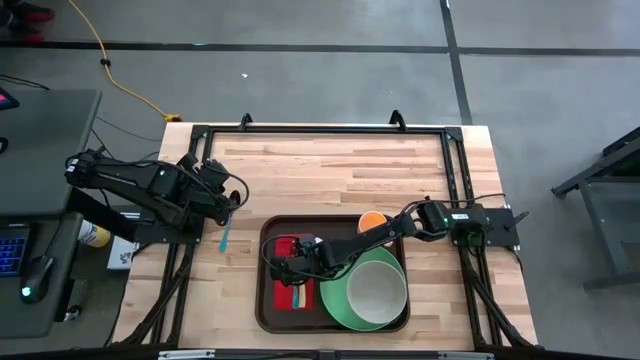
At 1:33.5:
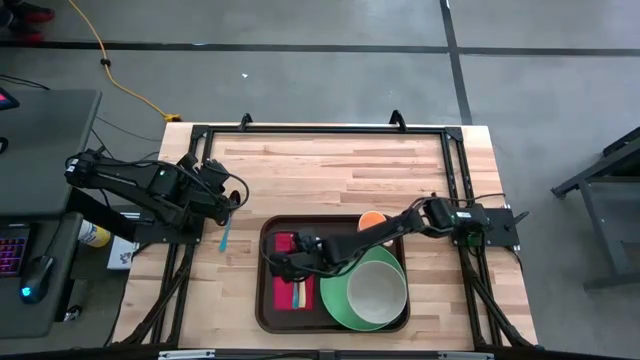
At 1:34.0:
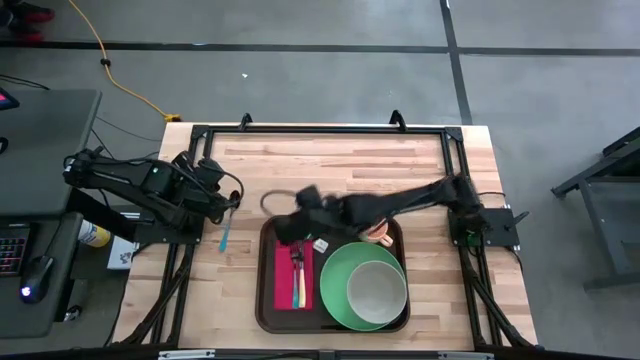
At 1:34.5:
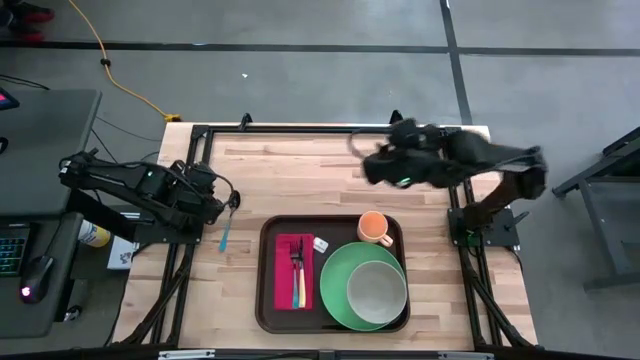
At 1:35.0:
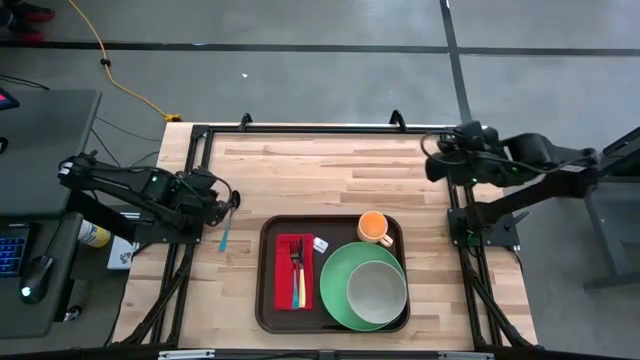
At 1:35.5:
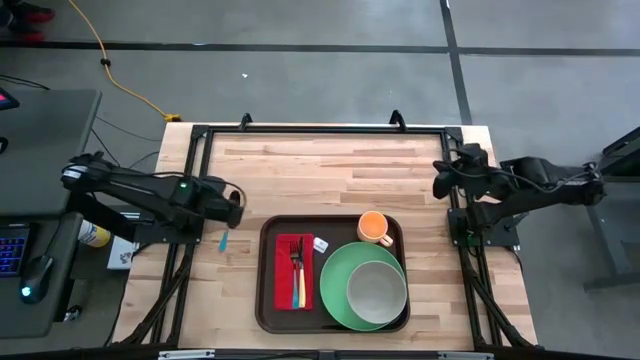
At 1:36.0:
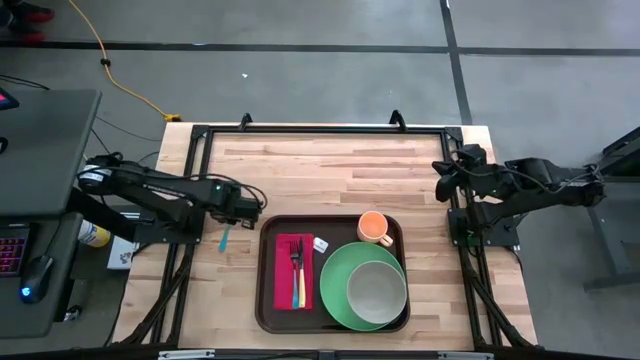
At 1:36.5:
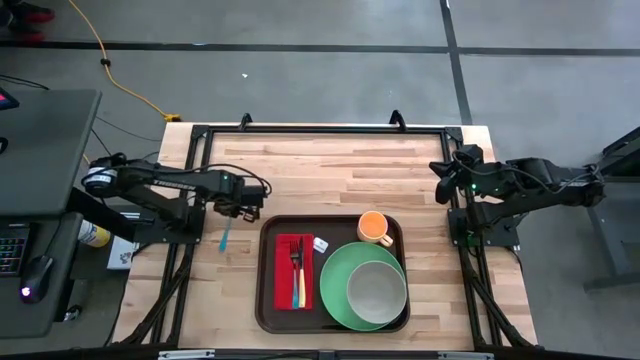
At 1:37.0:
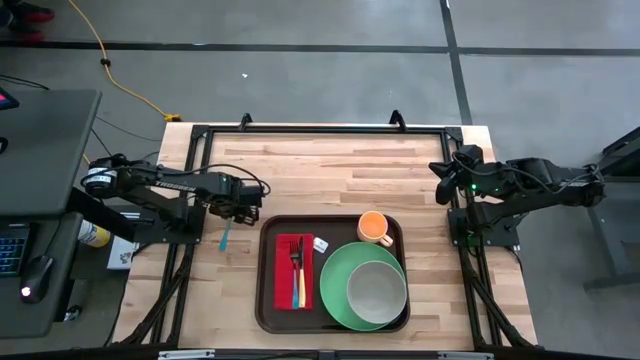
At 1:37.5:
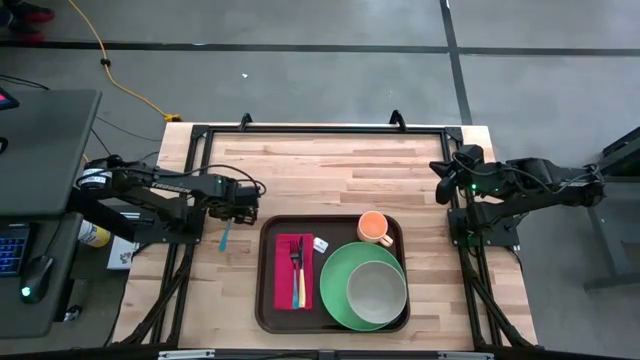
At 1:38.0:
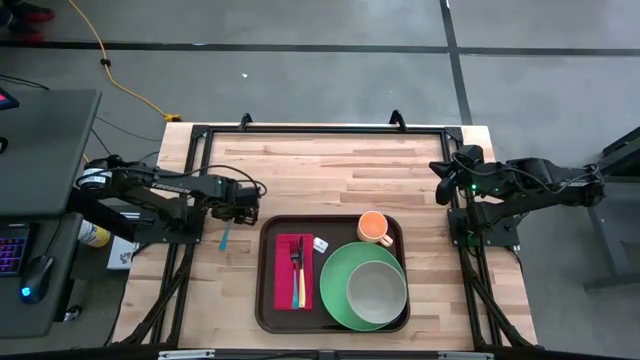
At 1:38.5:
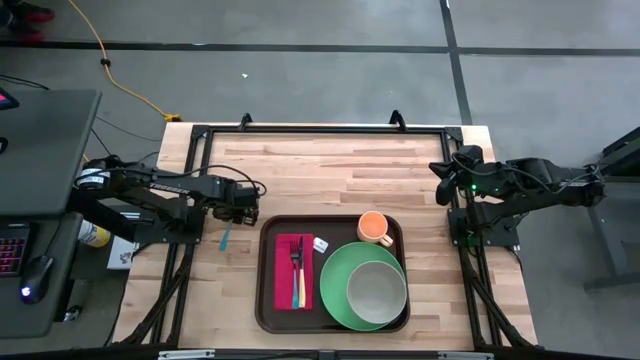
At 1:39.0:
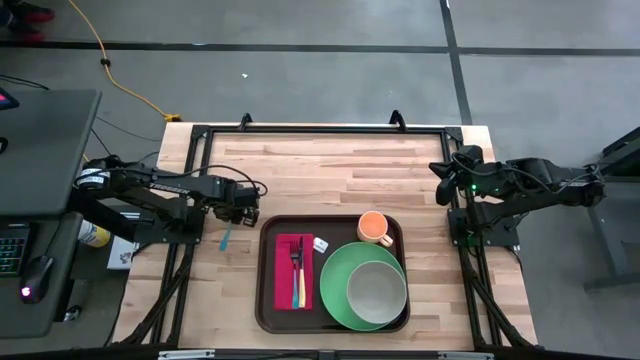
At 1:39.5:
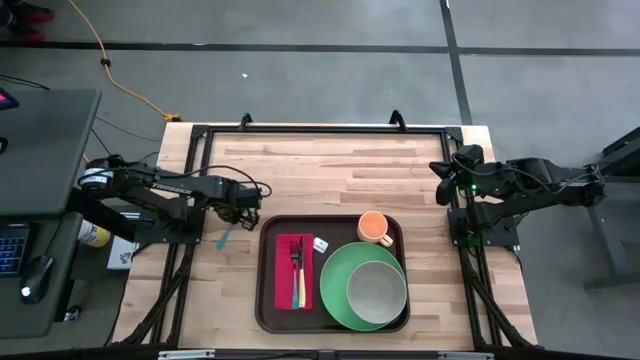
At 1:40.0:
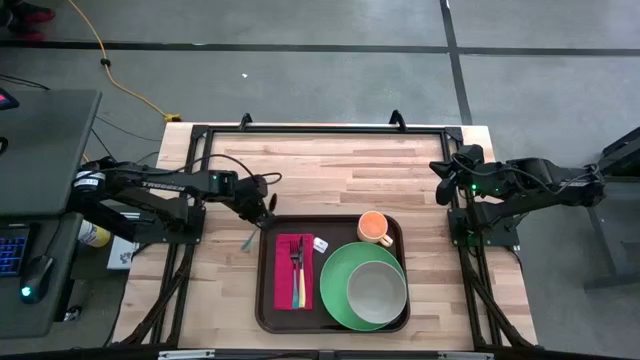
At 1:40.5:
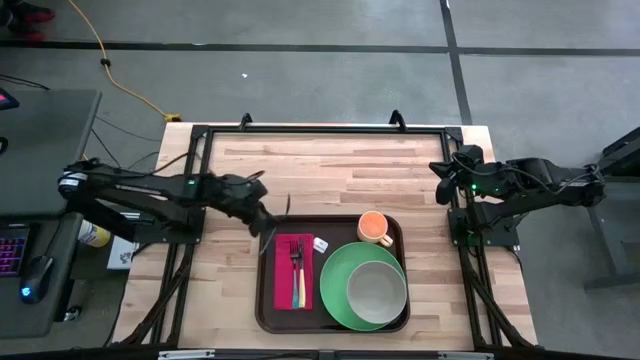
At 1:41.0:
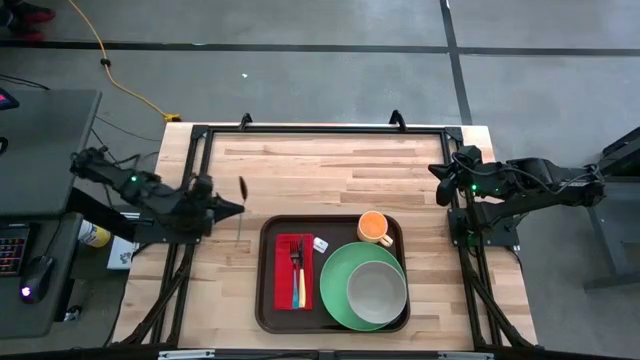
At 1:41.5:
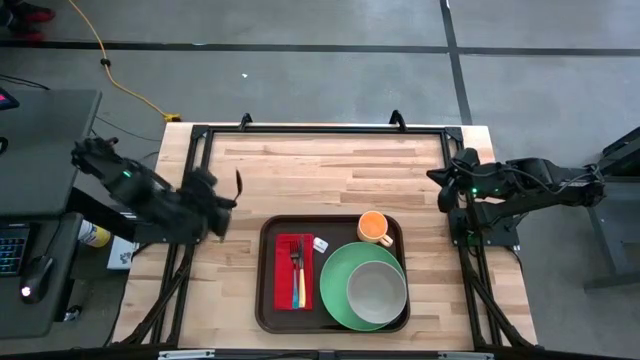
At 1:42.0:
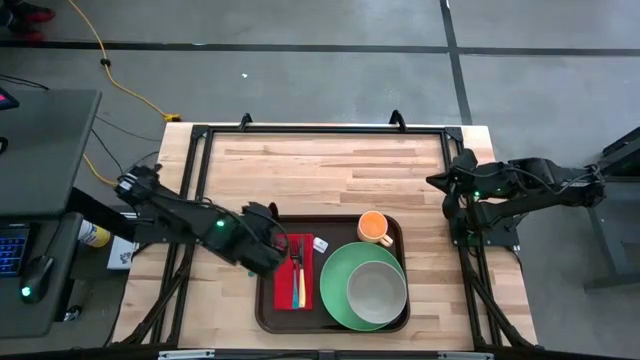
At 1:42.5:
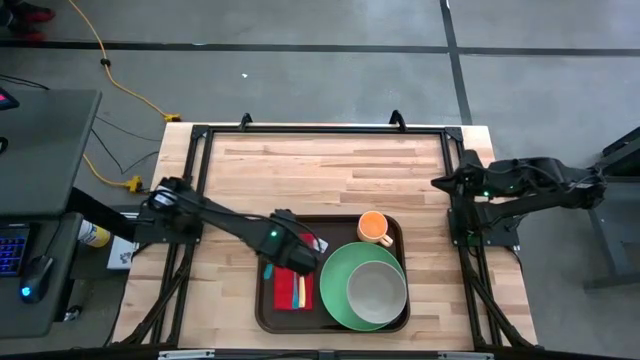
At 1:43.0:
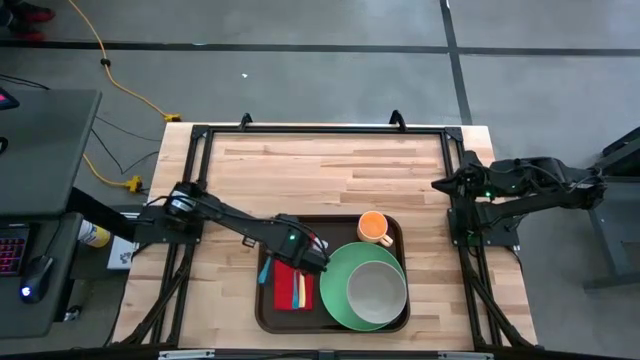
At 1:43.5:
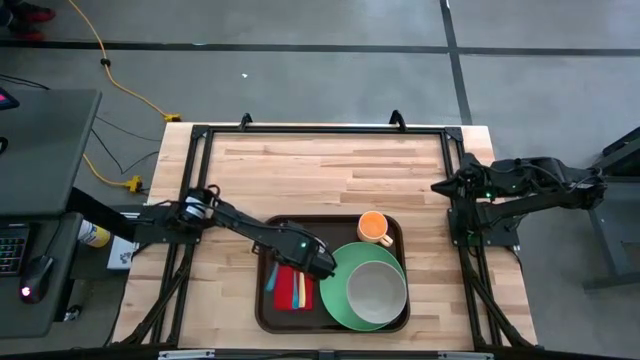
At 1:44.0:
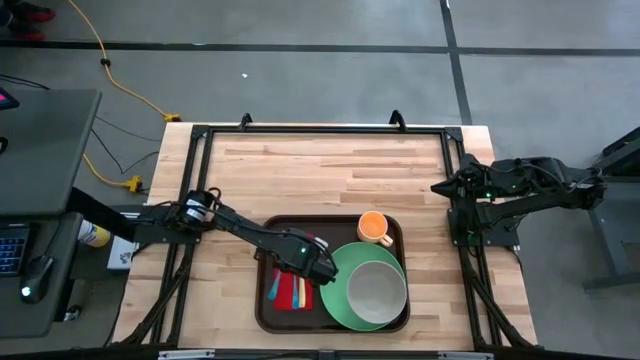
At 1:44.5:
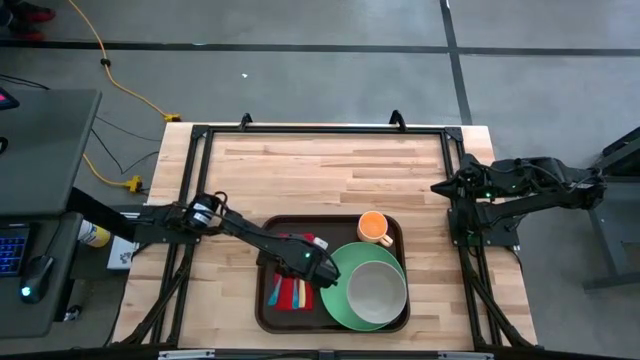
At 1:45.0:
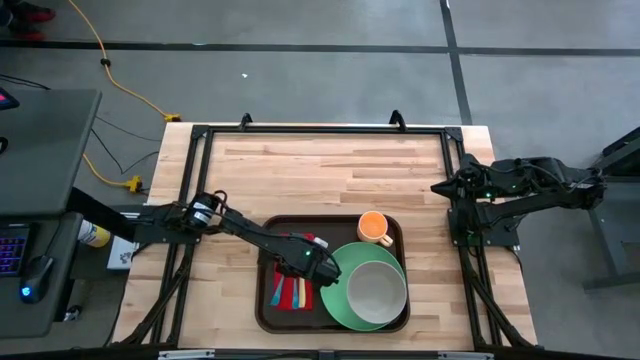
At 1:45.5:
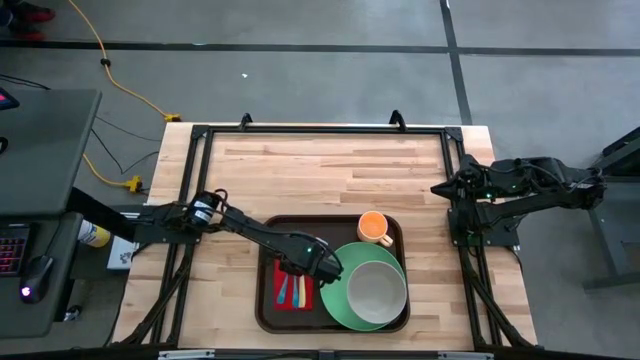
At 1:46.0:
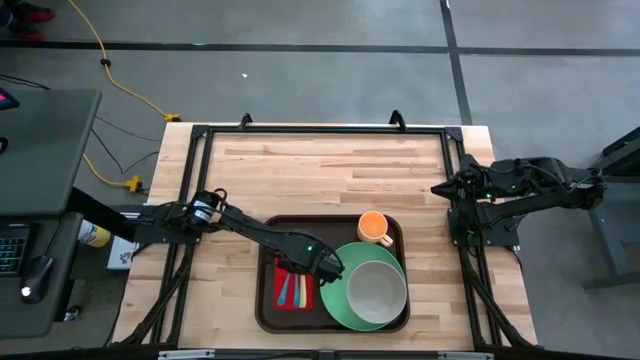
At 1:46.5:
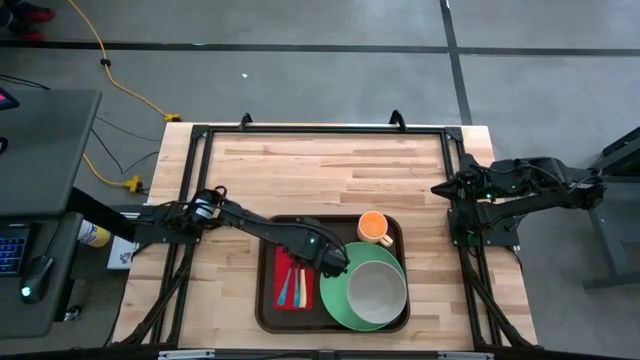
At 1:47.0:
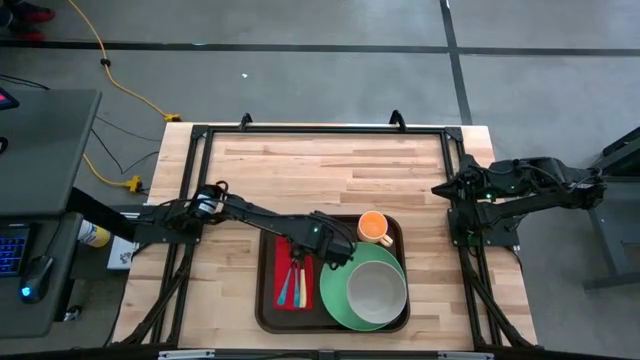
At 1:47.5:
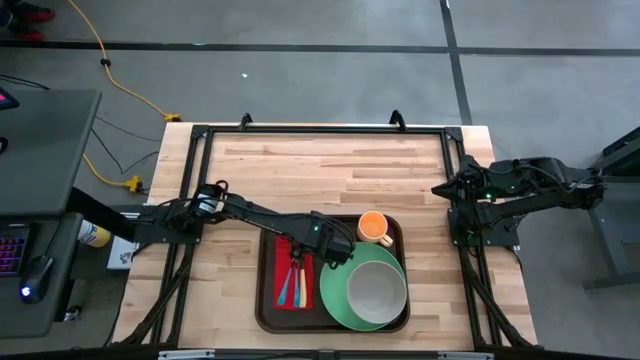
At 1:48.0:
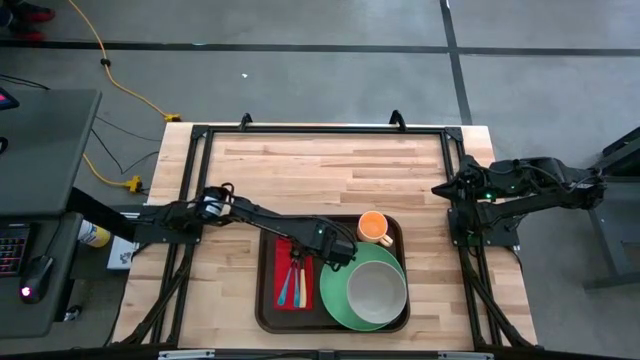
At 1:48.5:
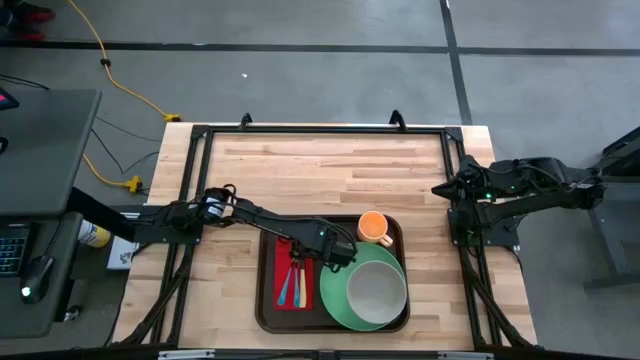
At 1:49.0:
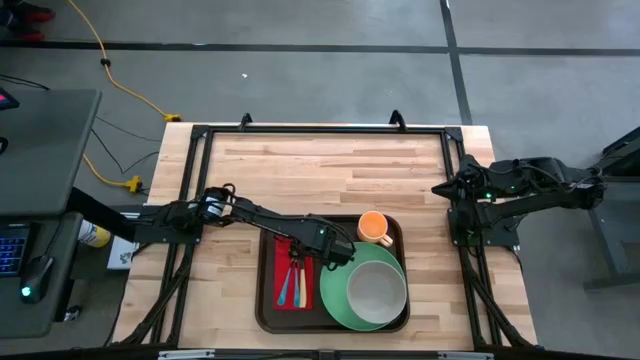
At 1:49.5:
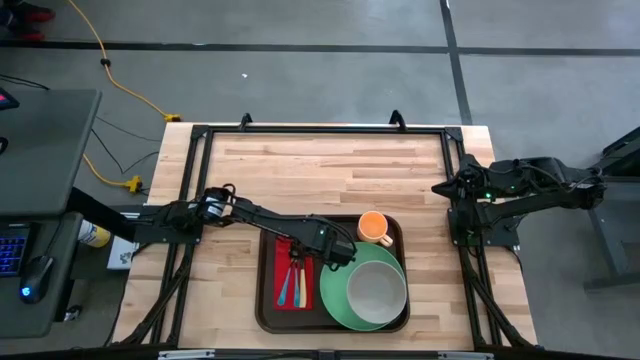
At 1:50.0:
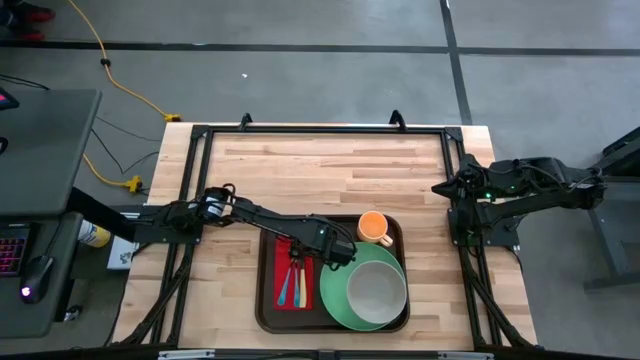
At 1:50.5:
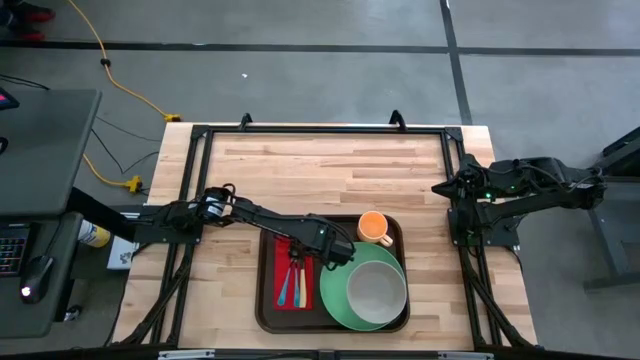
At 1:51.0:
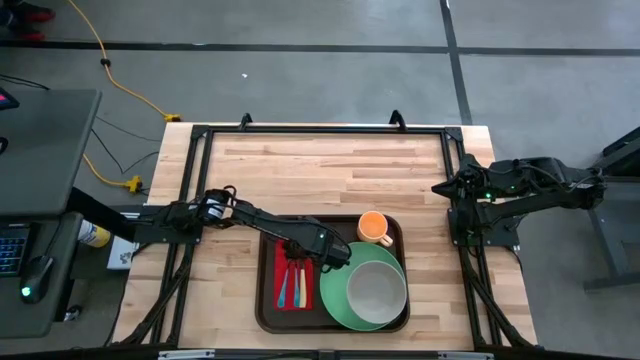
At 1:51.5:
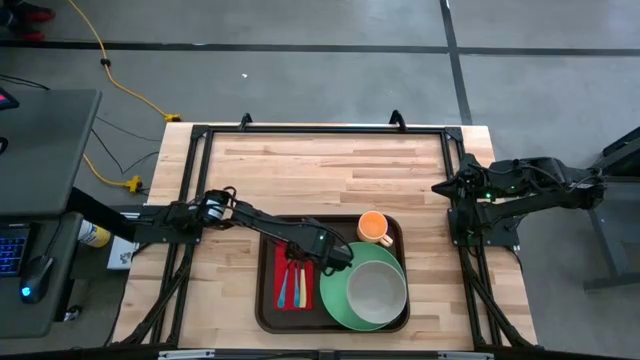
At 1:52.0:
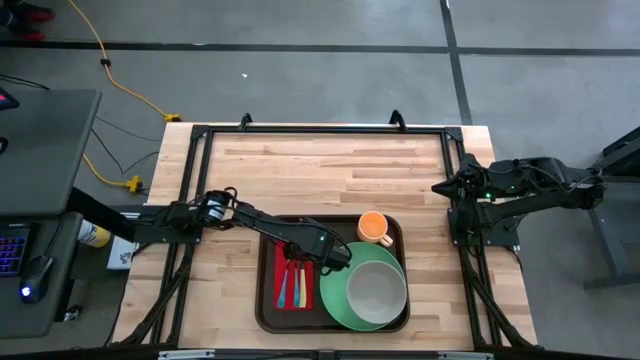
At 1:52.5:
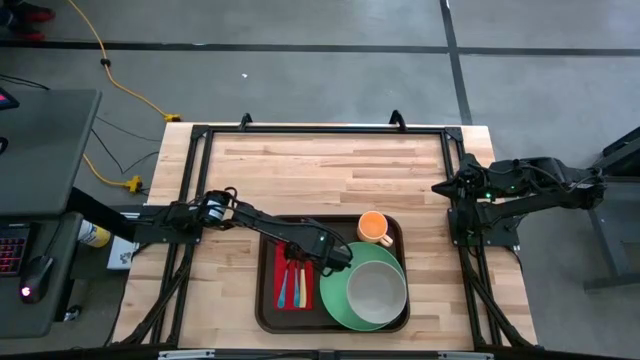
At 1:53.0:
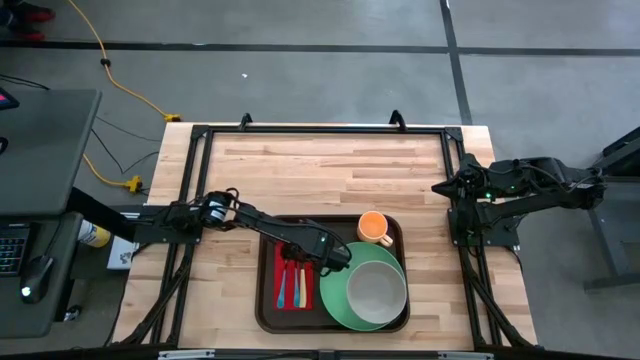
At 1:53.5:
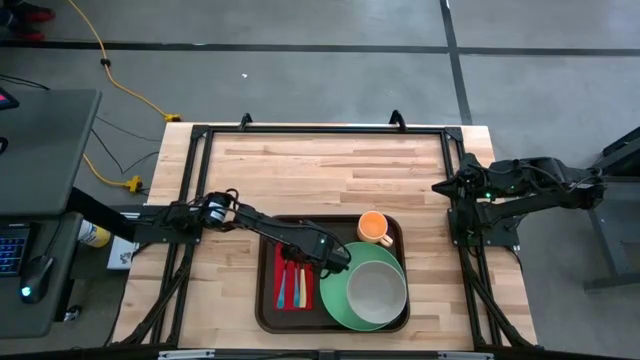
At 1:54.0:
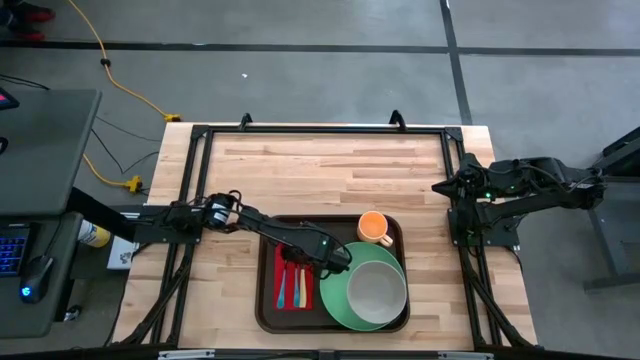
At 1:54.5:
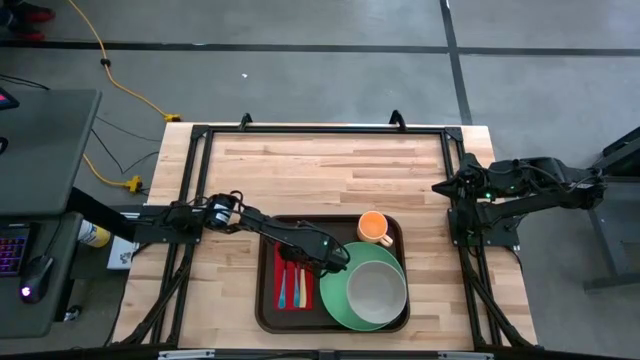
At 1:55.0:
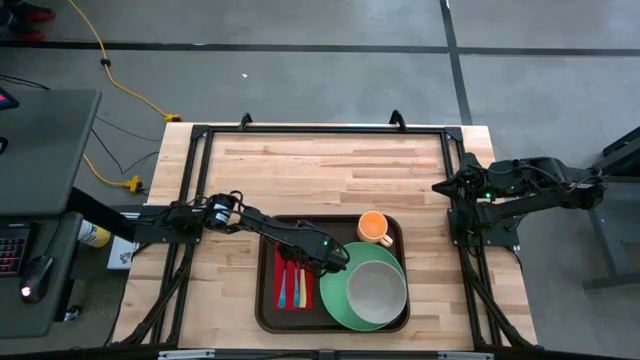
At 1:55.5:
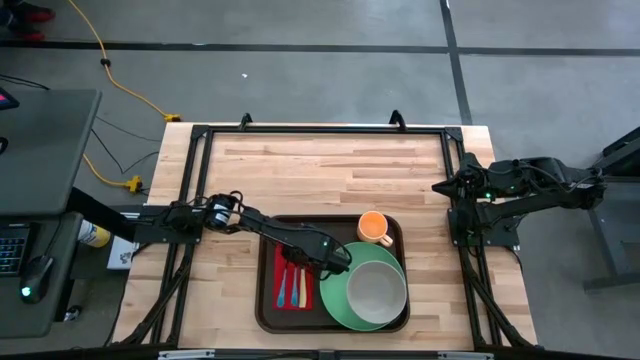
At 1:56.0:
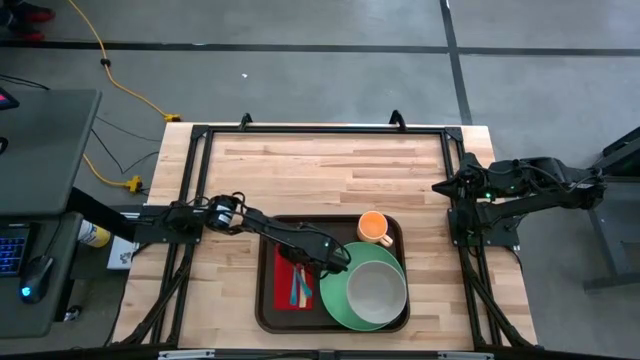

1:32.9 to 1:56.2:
Task: Set up tray
Put the blue spoon on the red table napkin to the left of the blue fork
